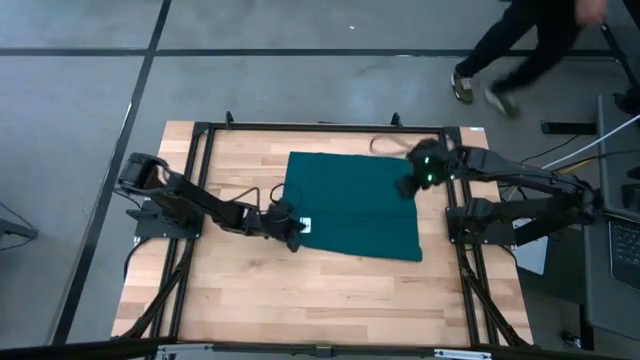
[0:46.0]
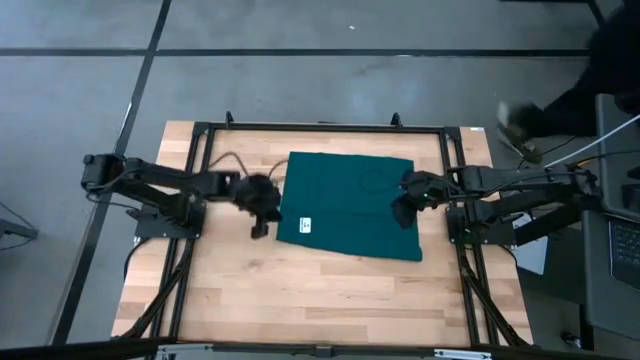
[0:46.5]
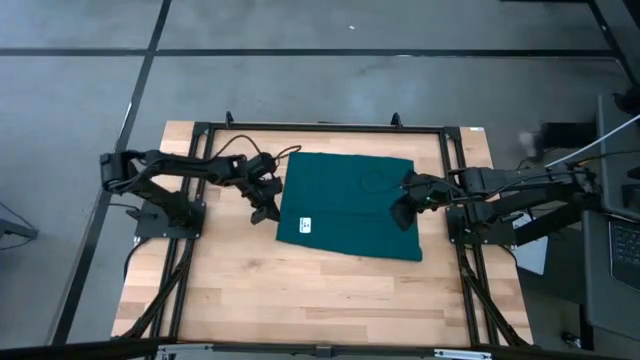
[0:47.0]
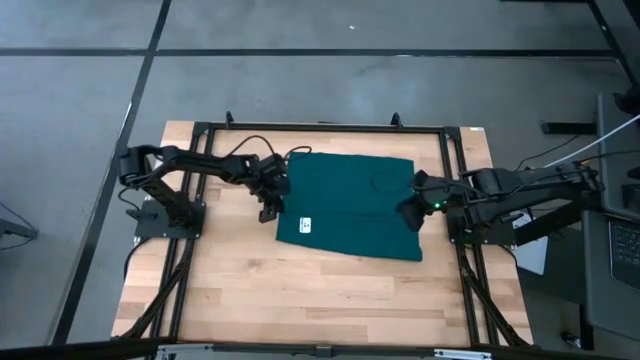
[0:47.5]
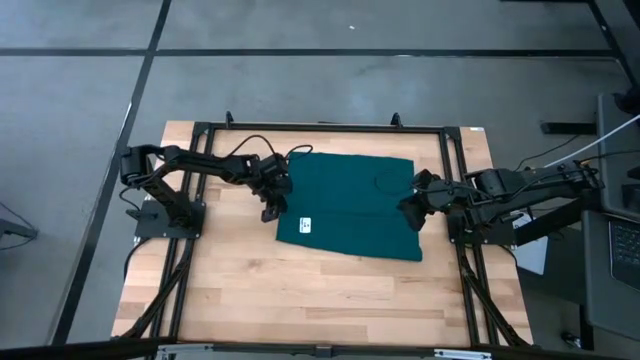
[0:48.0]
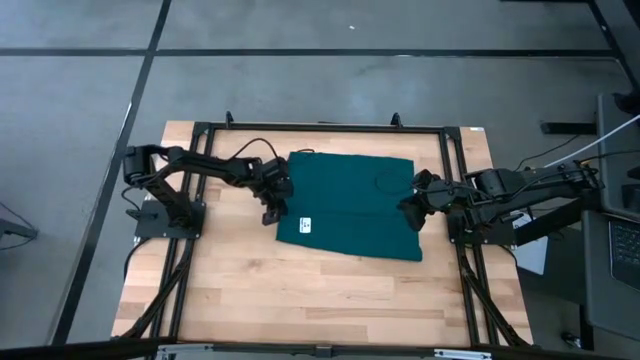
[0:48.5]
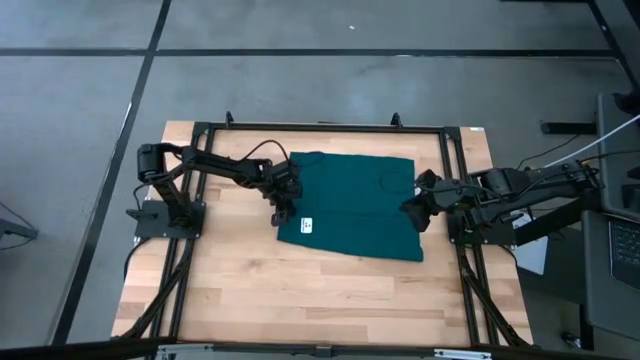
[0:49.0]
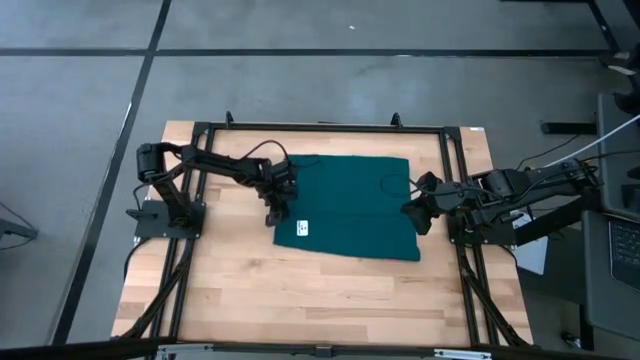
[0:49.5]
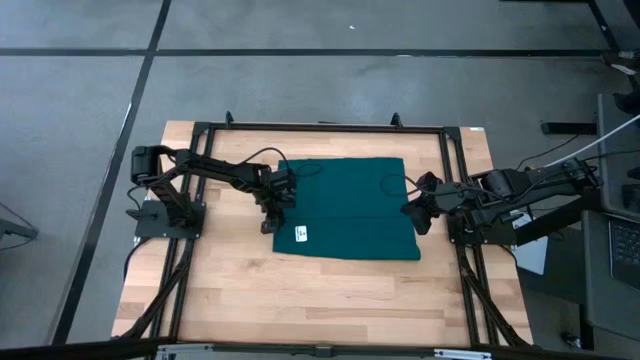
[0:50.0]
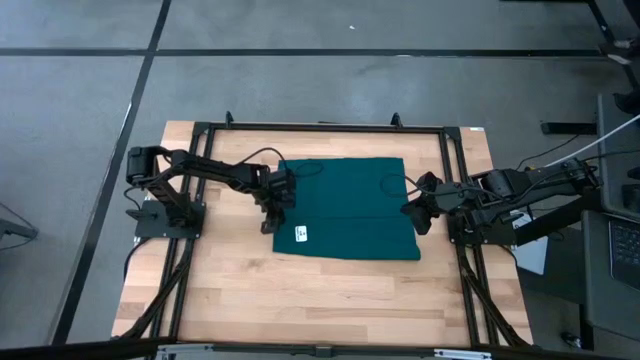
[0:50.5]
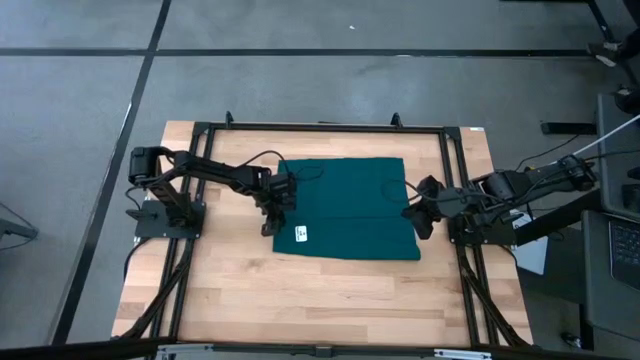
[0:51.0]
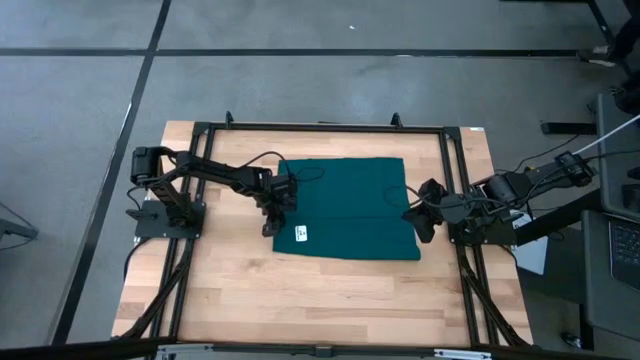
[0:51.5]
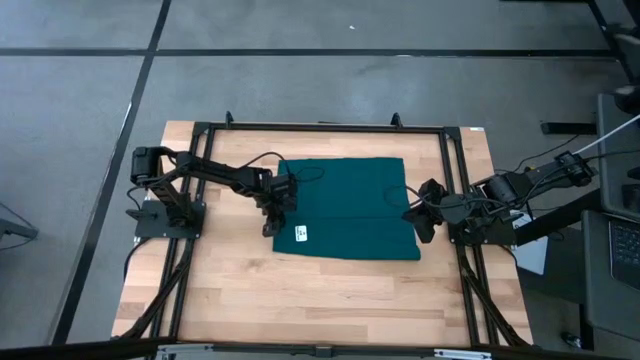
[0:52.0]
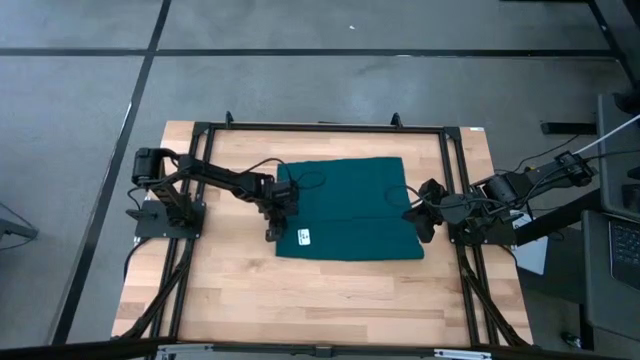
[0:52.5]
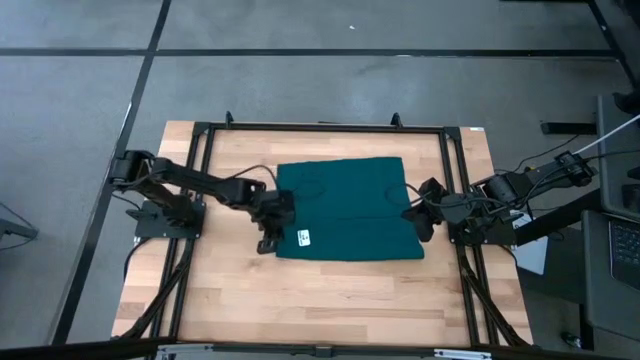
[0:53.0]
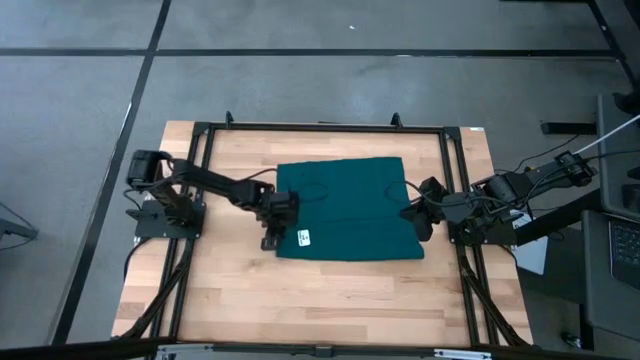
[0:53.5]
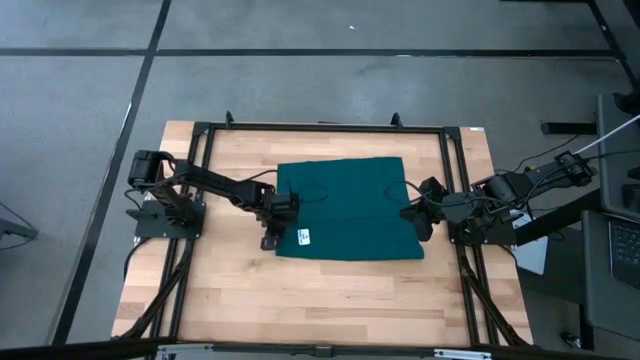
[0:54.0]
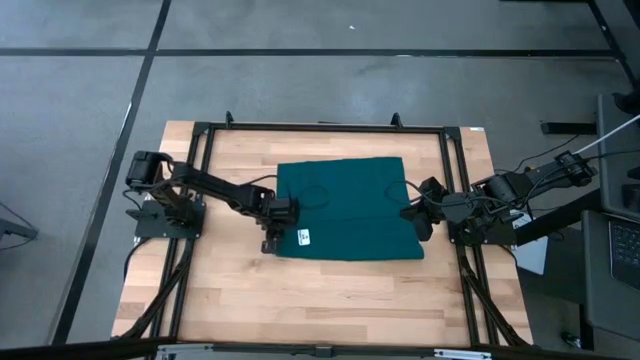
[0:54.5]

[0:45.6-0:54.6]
Task: Fold microfiber towels
Fold the green towel

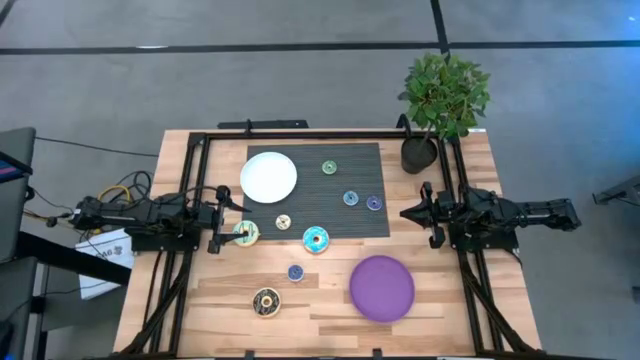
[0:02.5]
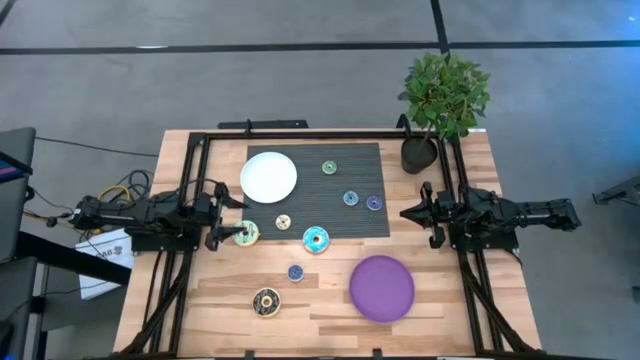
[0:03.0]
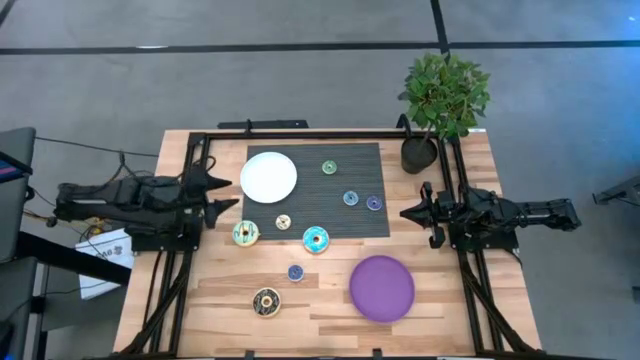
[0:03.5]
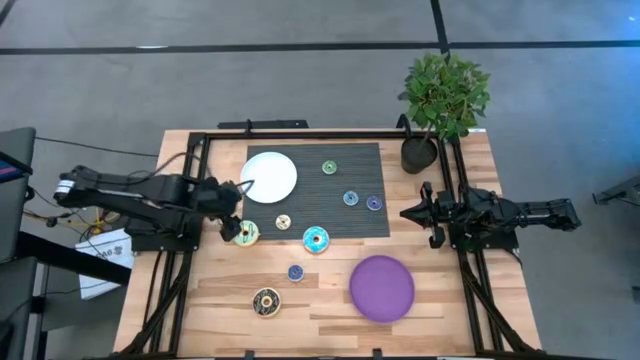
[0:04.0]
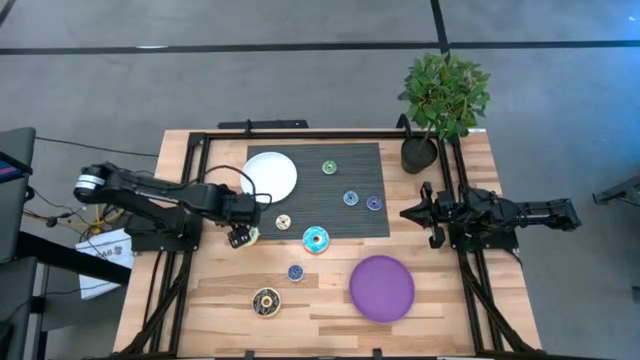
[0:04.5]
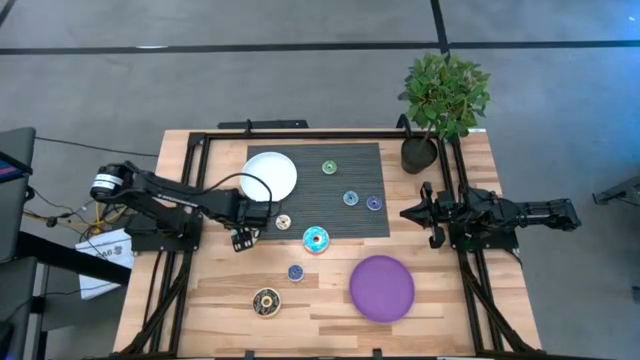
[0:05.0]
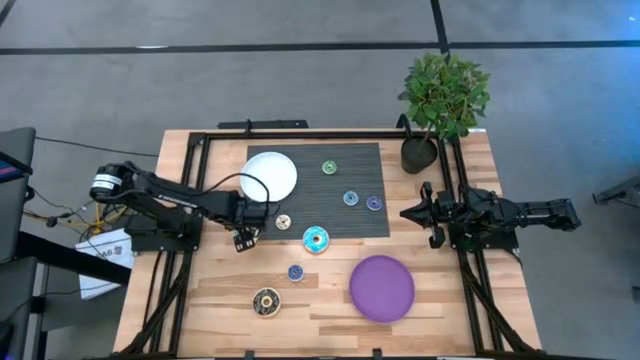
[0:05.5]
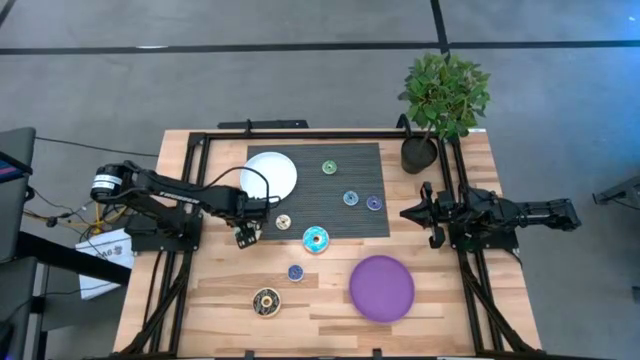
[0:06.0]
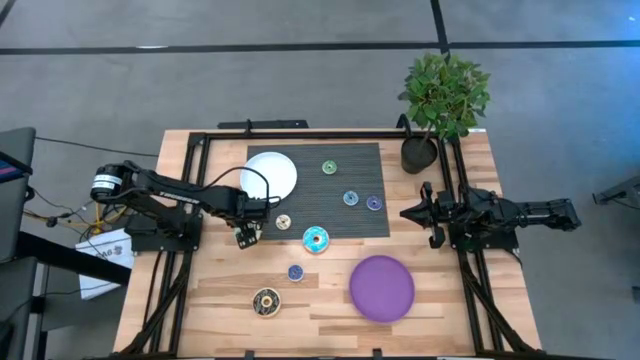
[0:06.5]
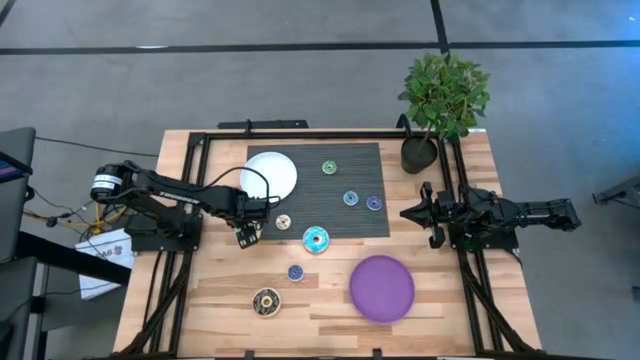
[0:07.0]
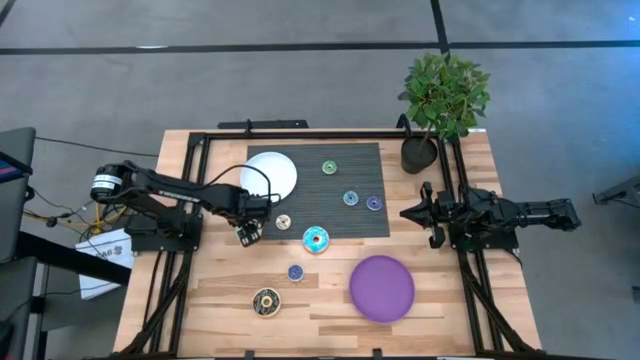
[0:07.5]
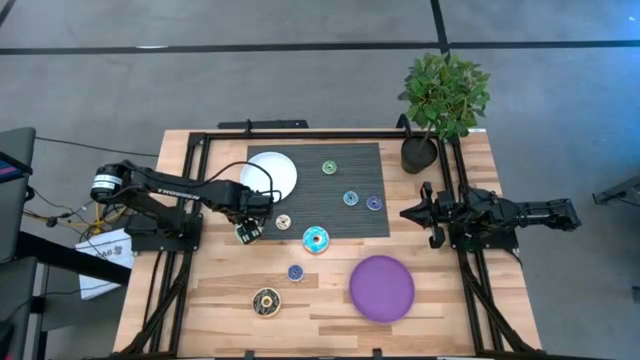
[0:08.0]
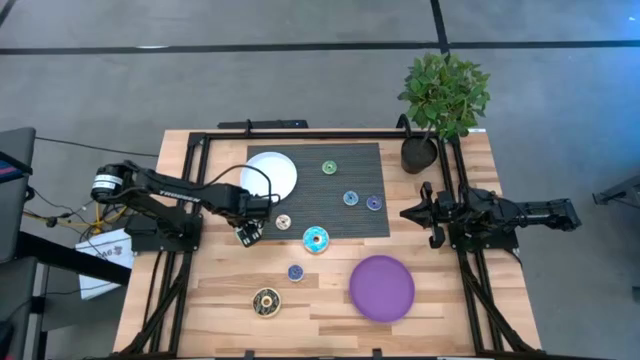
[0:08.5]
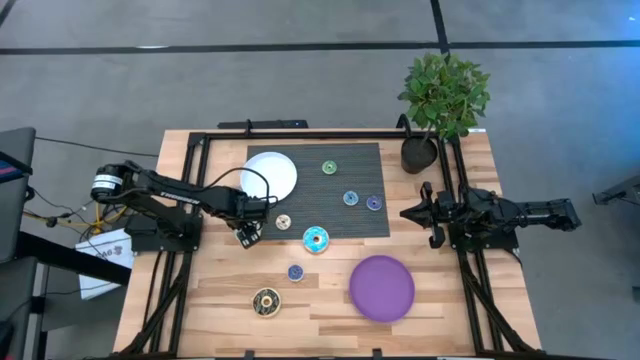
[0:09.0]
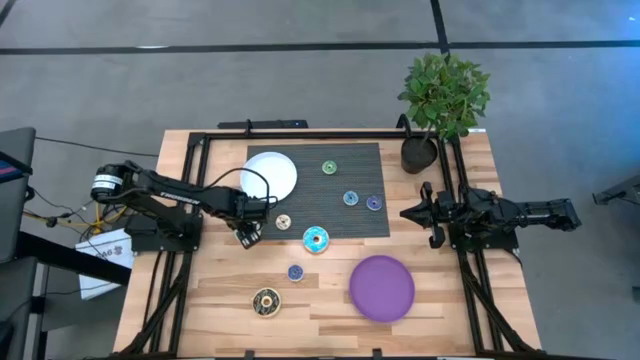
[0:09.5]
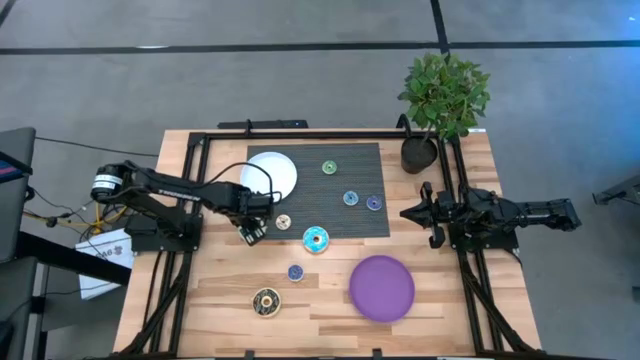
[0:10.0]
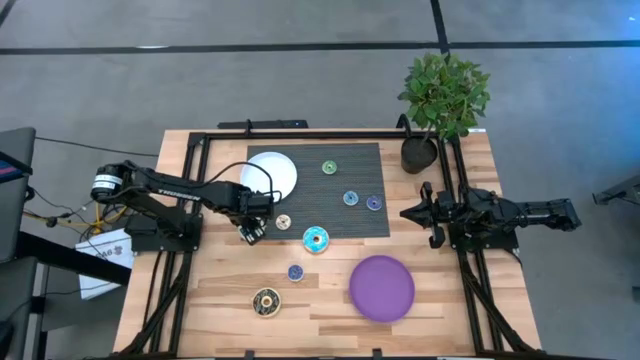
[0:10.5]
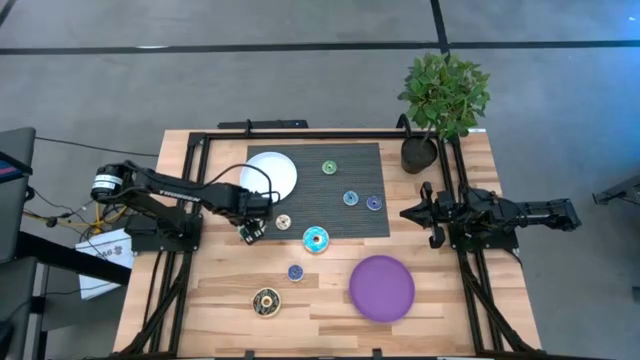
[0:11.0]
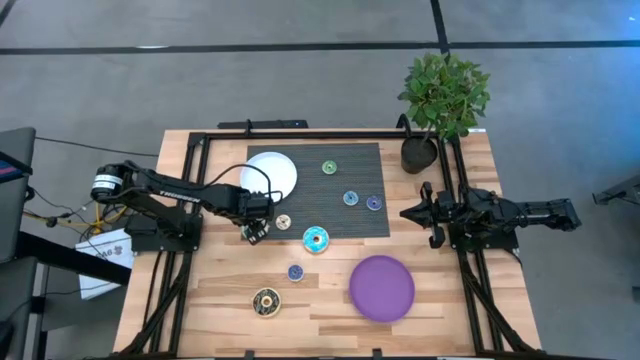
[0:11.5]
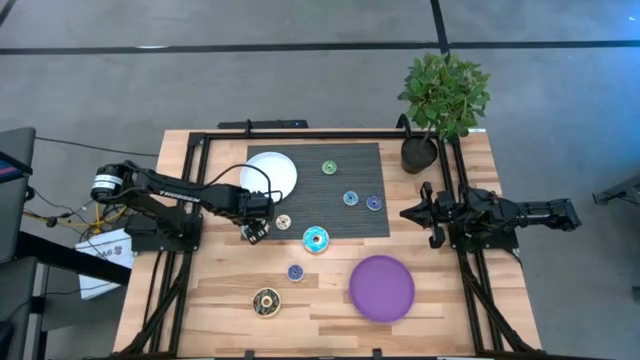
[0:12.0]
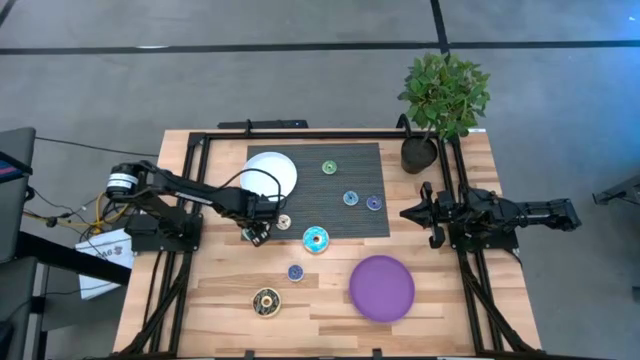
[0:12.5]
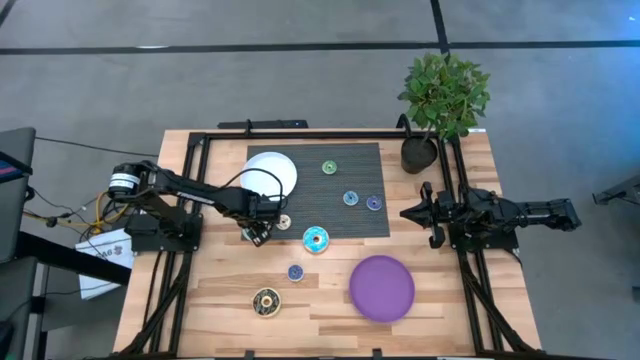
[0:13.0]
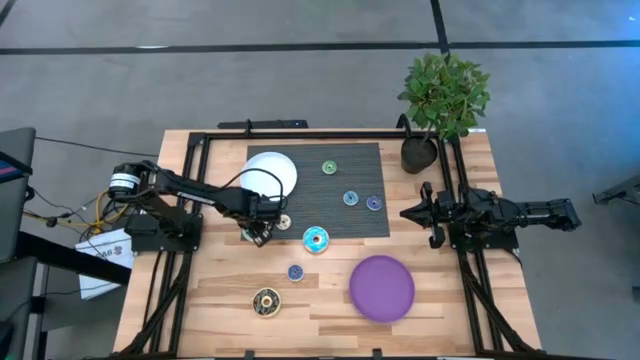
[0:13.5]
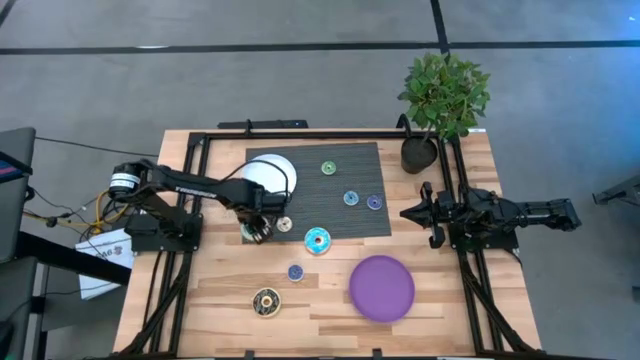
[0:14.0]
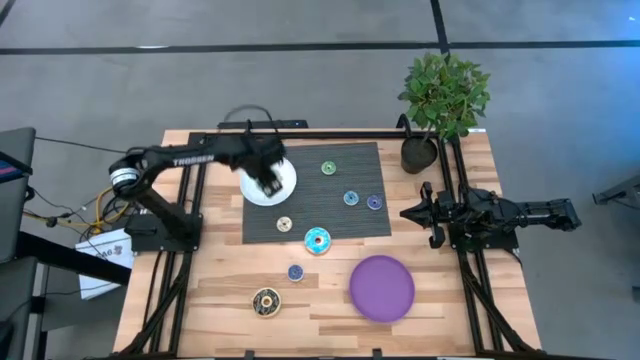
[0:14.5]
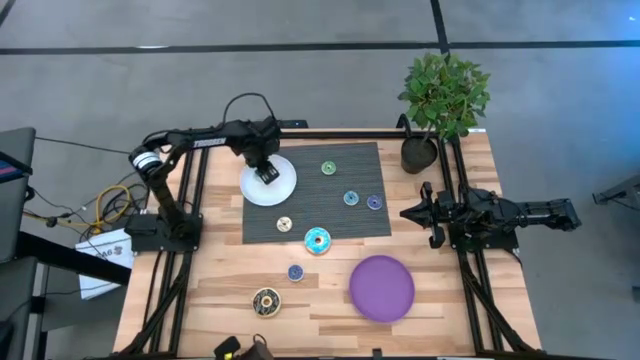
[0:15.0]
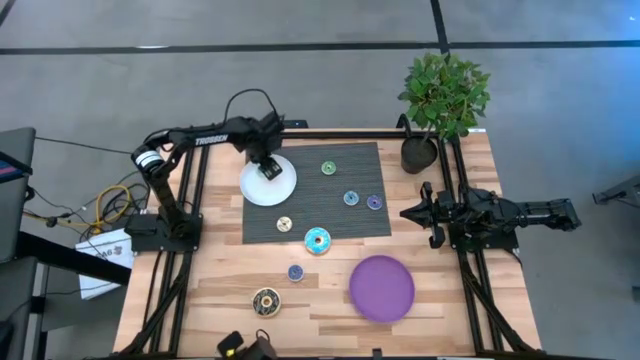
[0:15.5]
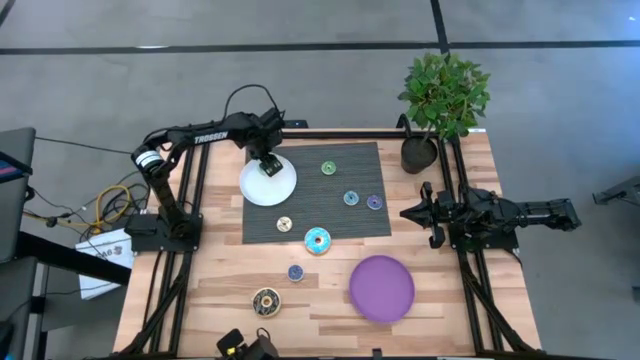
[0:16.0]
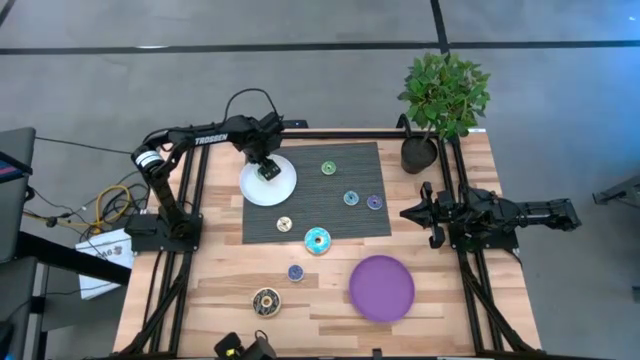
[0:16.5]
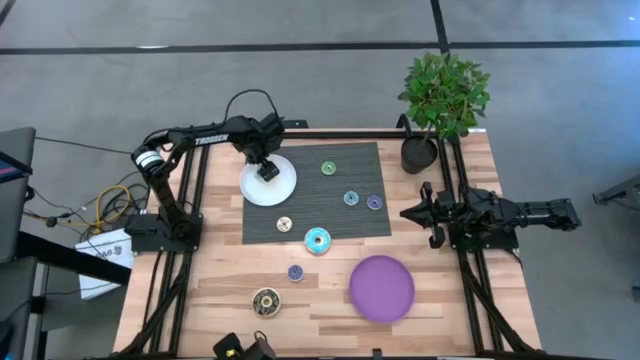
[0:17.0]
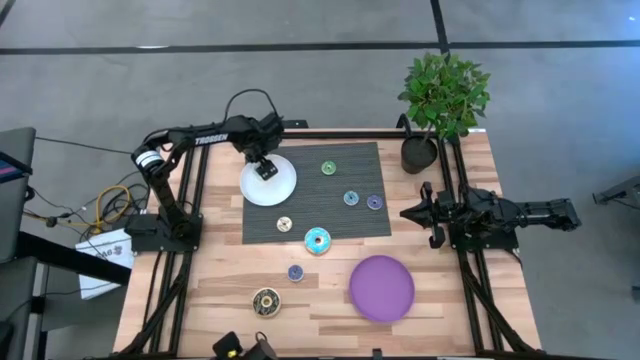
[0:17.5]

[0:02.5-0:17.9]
Task: Pick & Place donuts
Put the large light blue donut on the white plate
